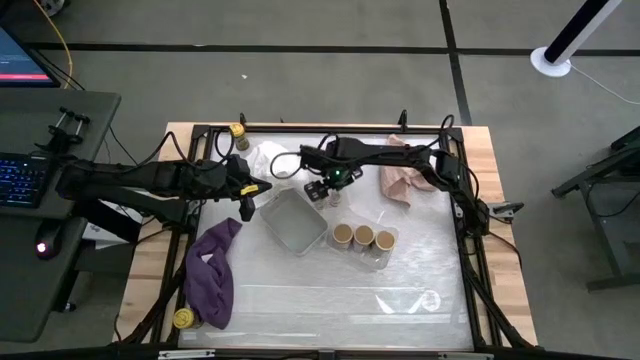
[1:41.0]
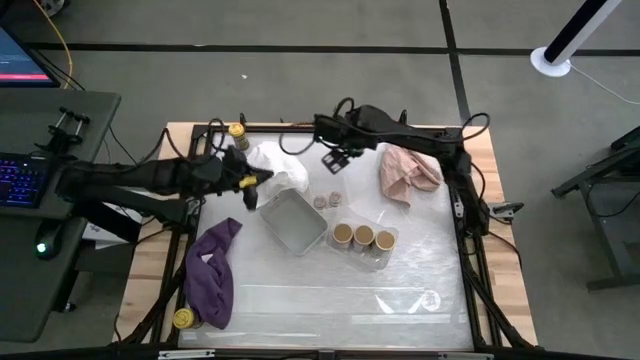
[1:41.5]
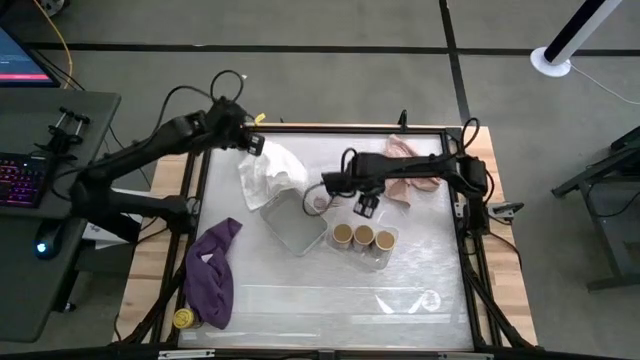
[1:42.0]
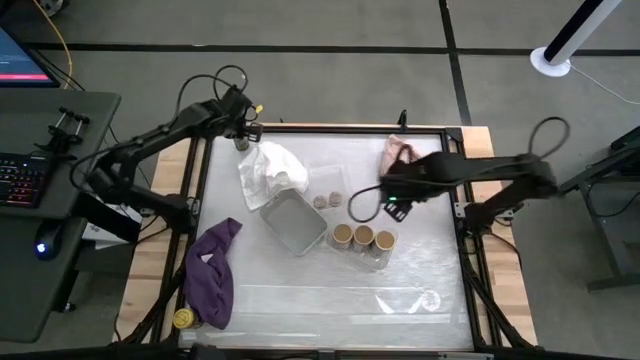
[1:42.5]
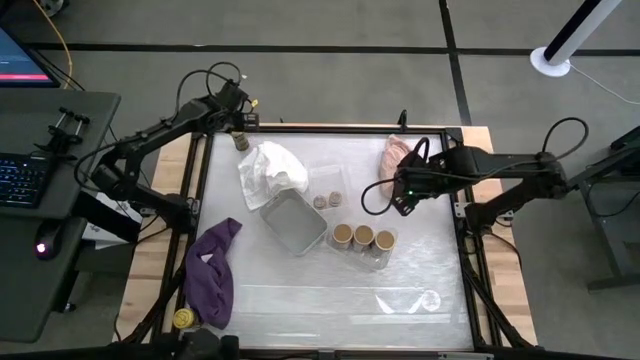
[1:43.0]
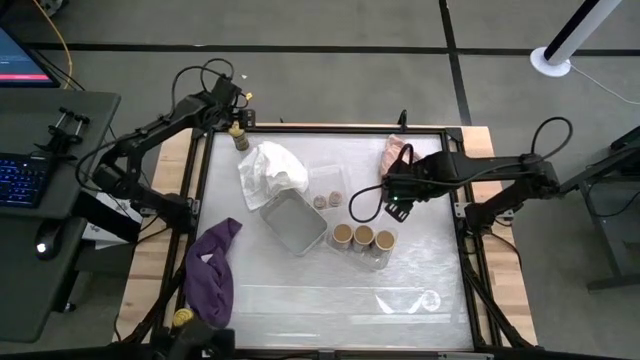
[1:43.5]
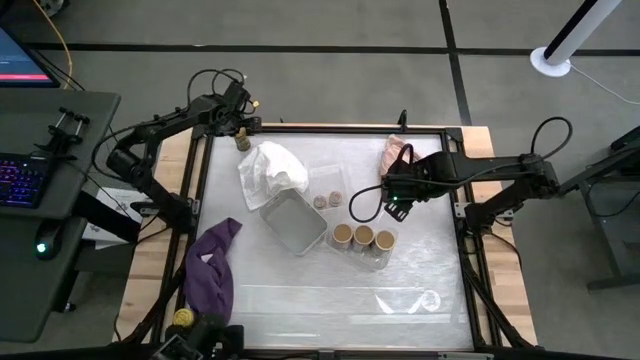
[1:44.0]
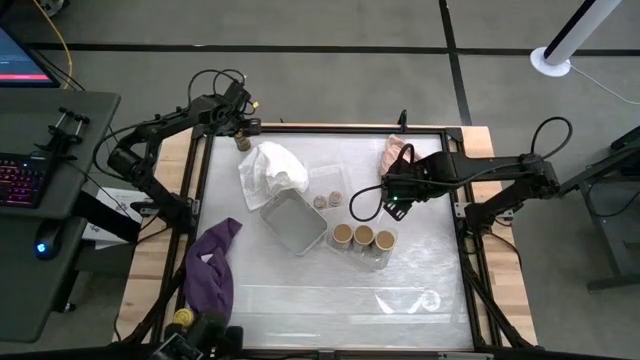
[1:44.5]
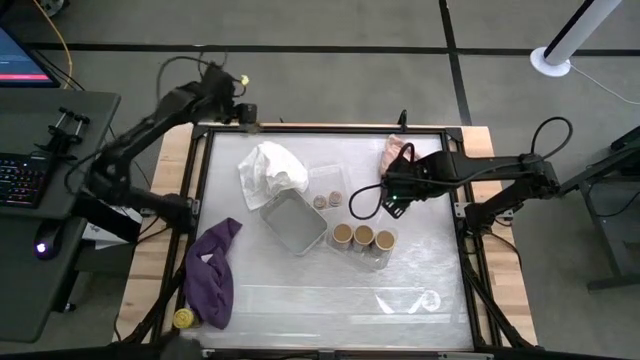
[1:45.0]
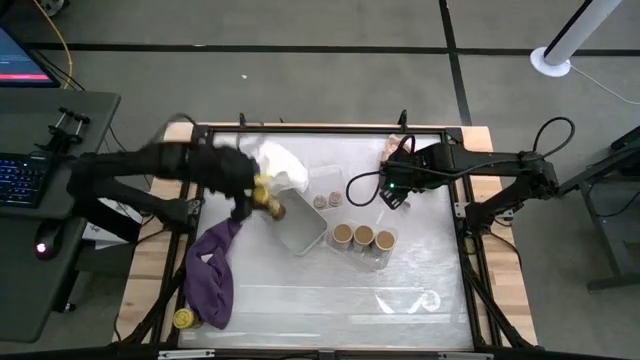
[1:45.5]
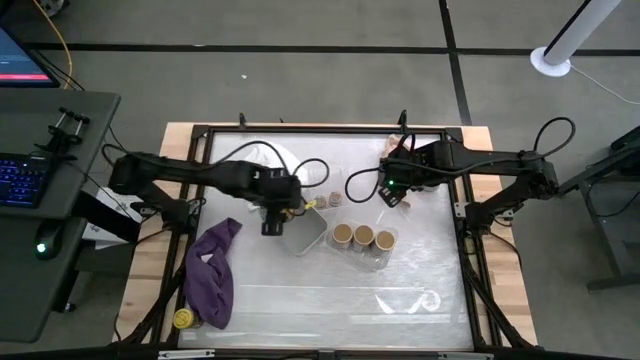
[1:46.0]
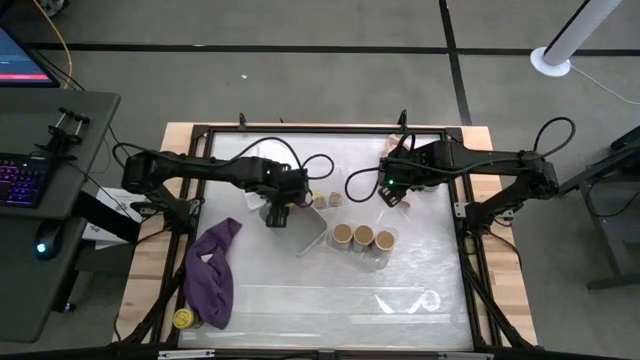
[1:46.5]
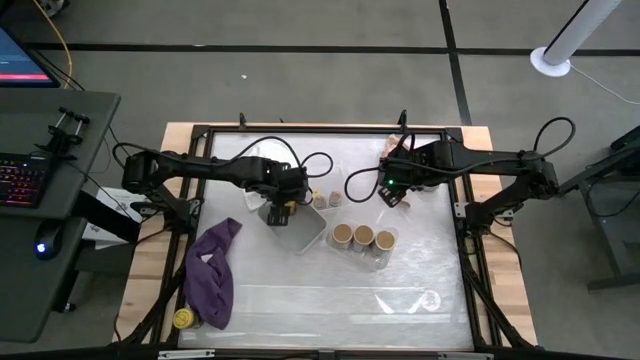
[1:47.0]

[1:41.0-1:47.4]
Task: Sort spices by type
Put the top yellow seasoning bottle into the gray bin

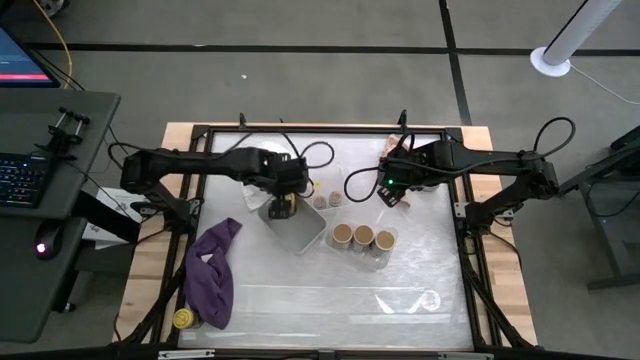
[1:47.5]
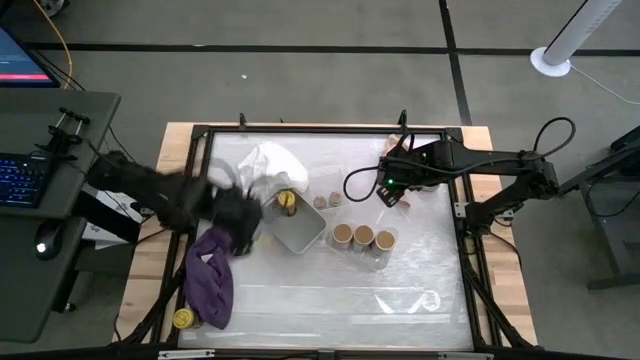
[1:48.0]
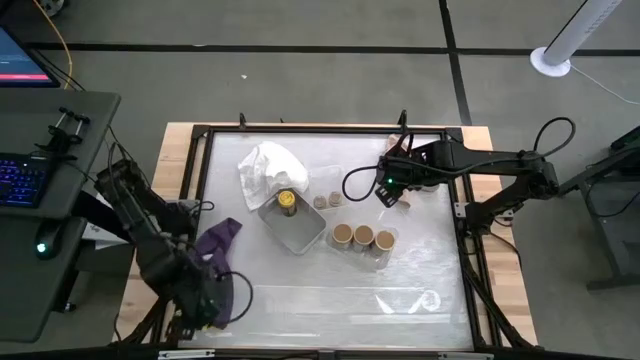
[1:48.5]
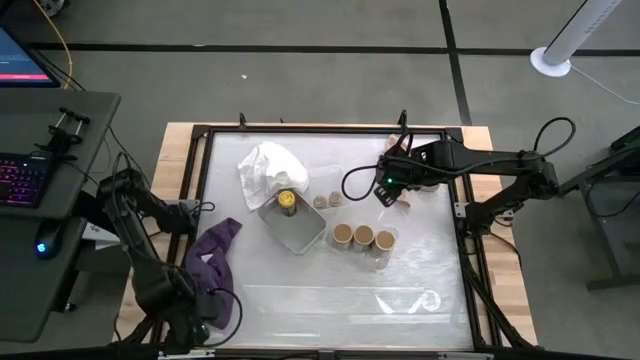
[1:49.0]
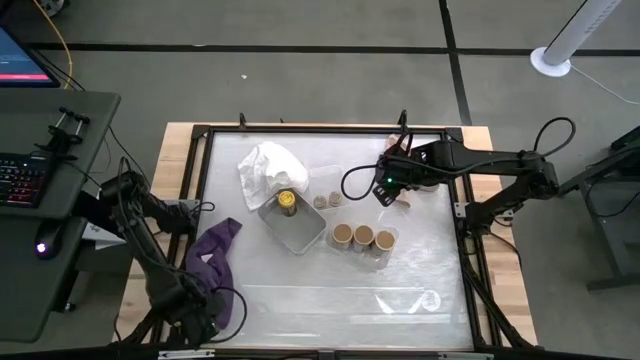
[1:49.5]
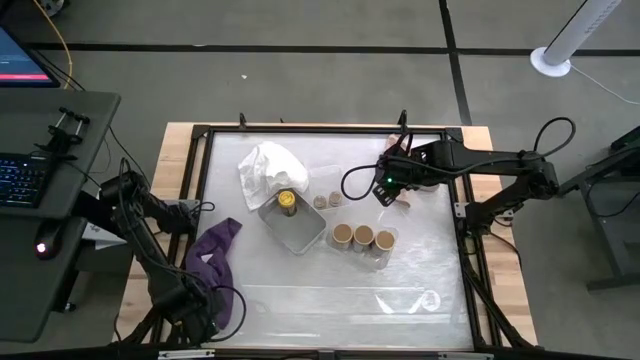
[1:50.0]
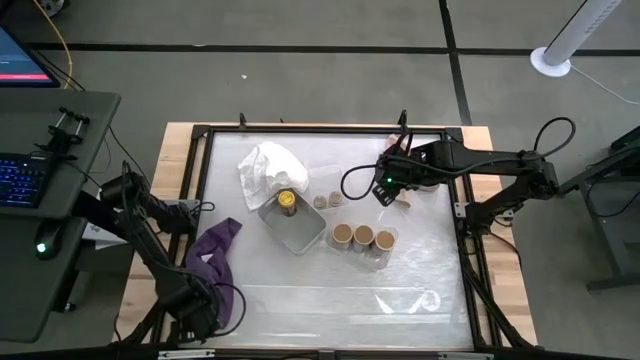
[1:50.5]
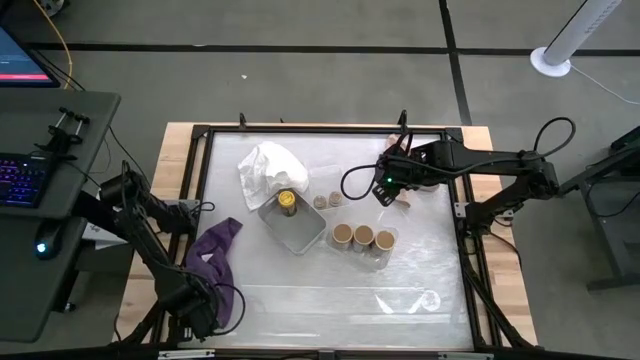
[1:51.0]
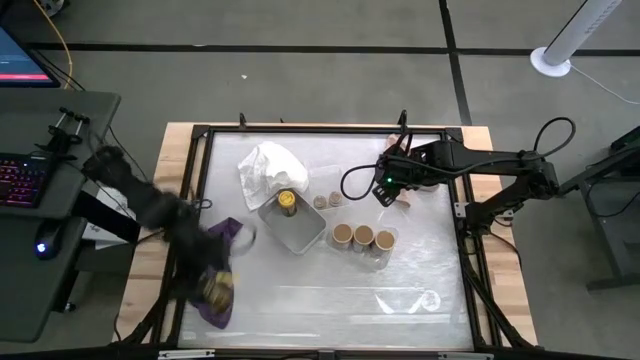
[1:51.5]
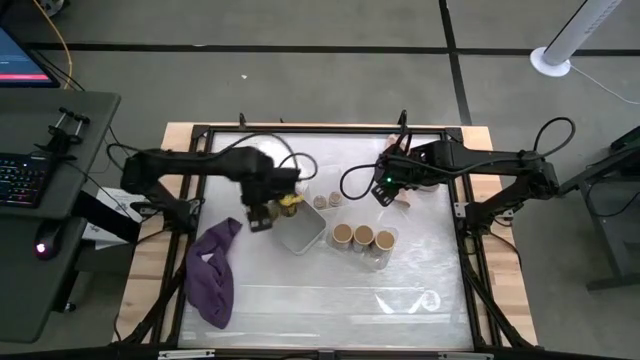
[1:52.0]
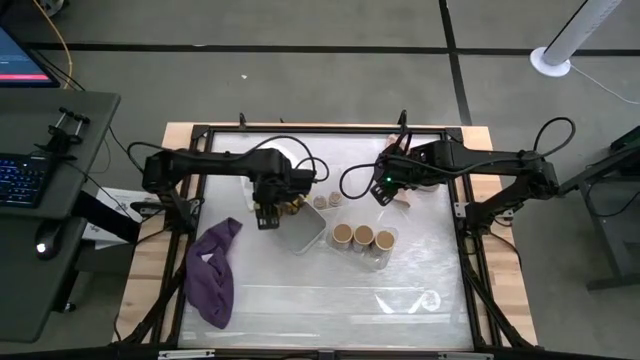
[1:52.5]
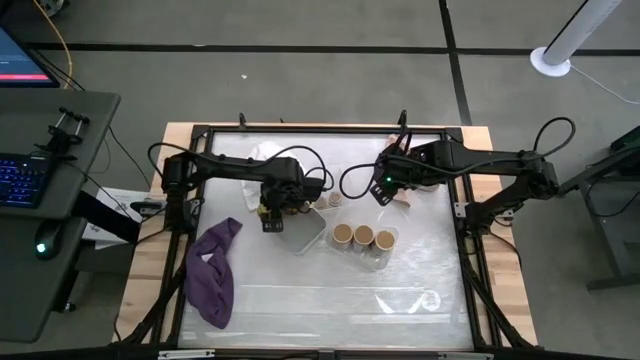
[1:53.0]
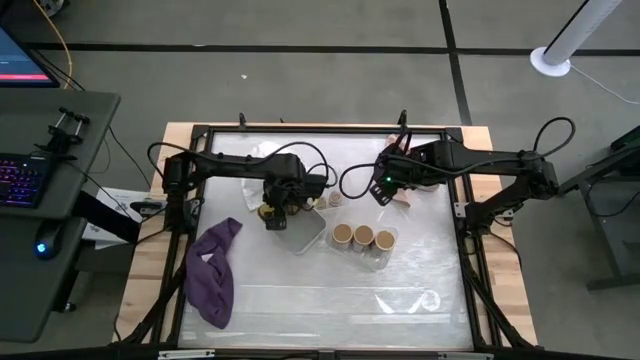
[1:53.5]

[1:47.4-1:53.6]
Put the yellow seasoning bottle into the gray bin

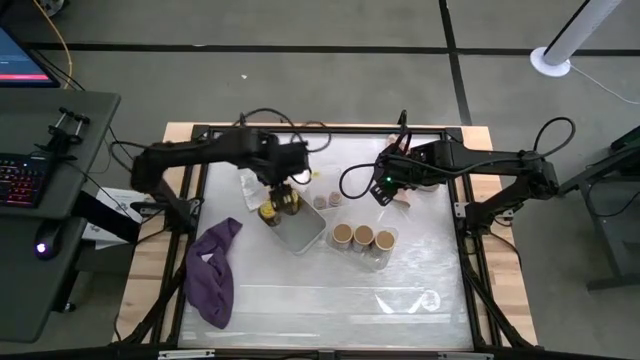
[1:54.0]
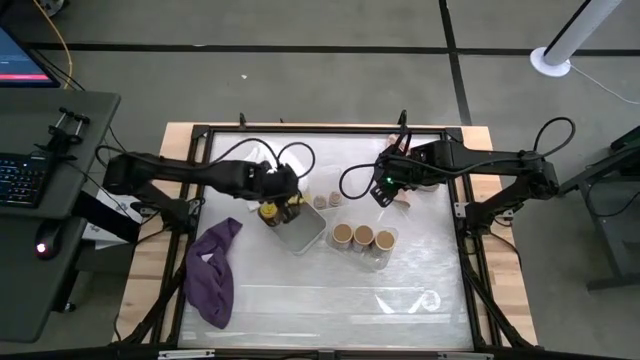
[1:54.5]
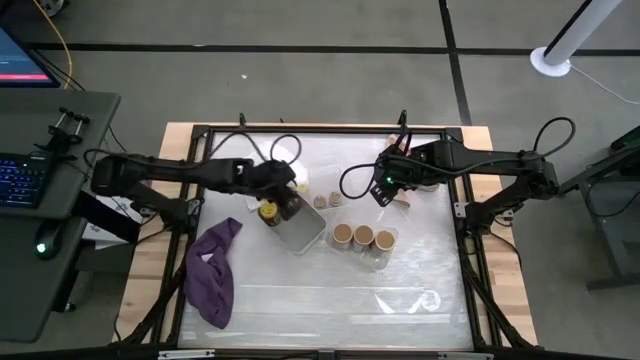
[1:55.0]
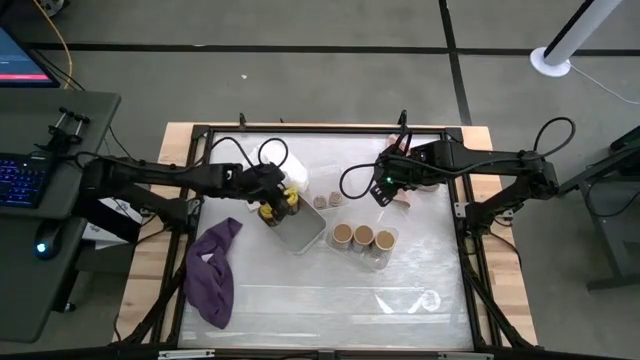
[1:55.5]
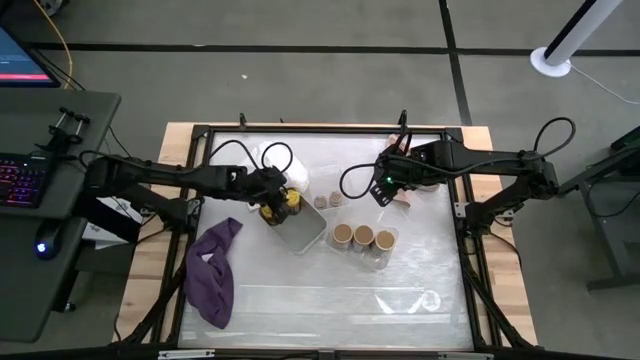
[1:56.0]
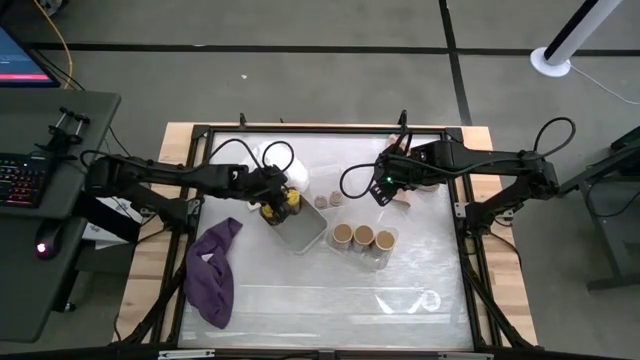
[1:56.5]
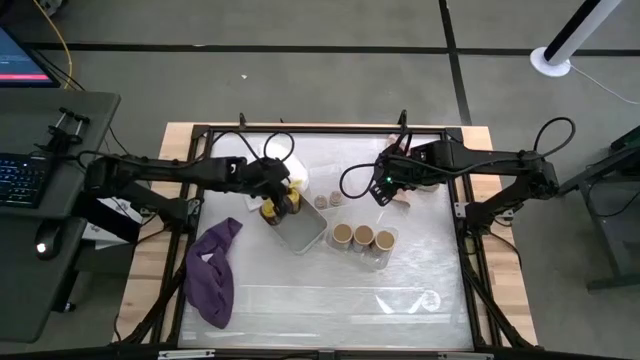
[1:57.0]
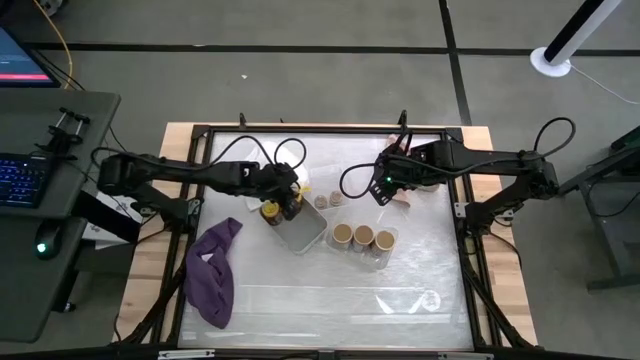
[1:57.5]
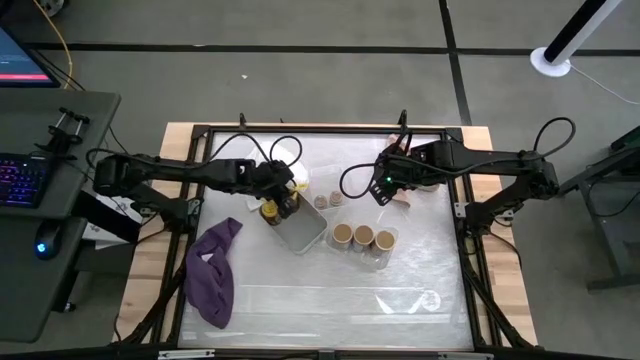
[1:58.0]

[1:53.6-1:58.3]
Adjust the right yellow seasoning bottle in the gray bin

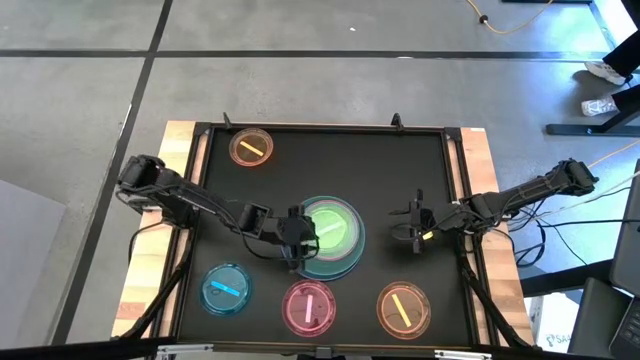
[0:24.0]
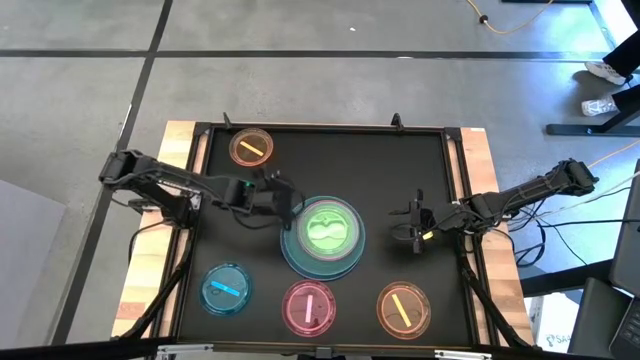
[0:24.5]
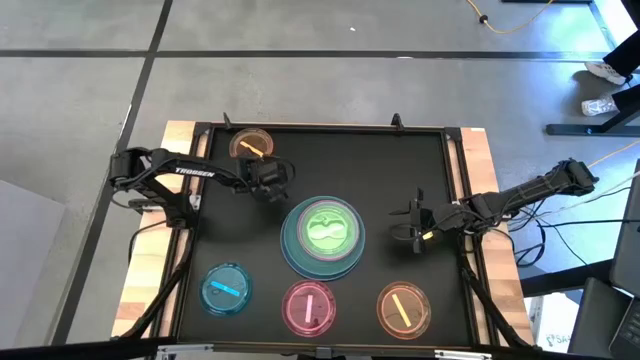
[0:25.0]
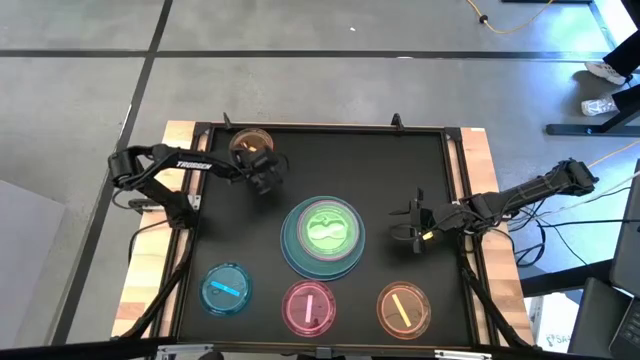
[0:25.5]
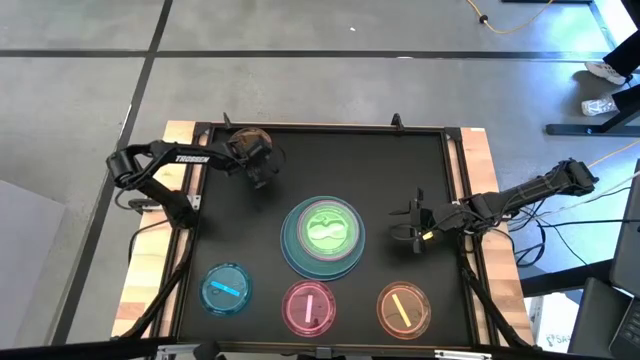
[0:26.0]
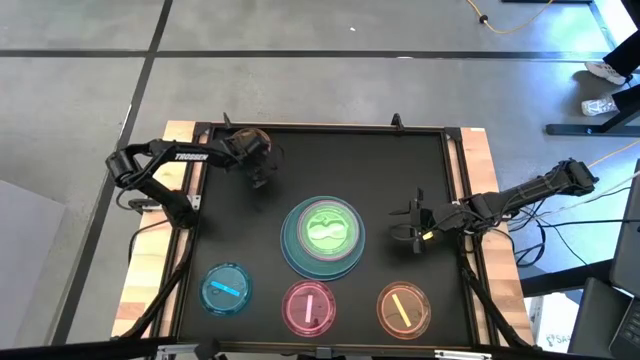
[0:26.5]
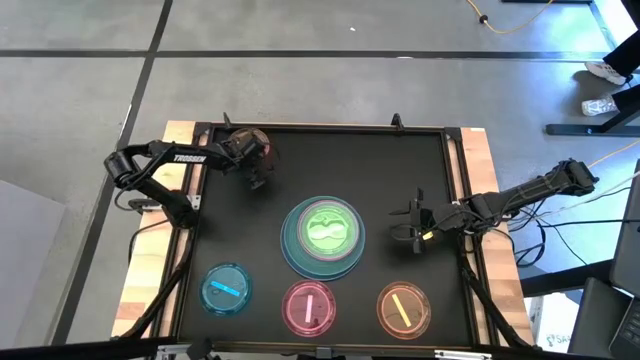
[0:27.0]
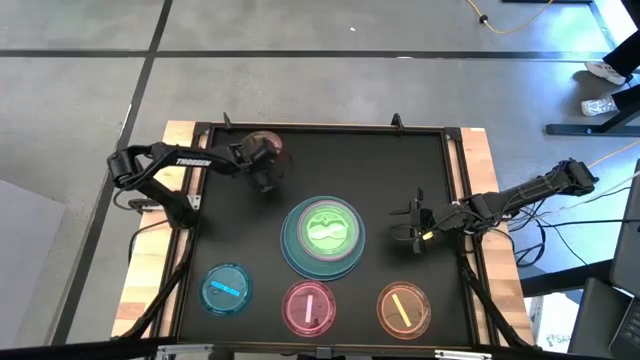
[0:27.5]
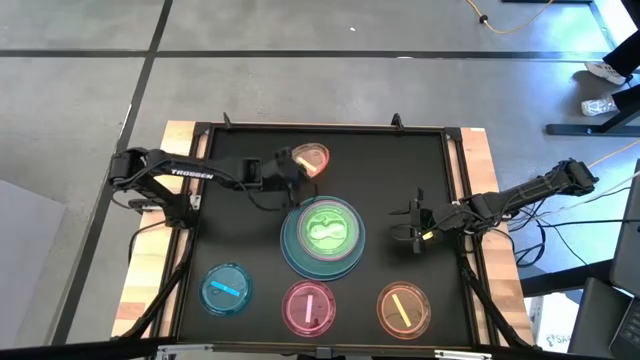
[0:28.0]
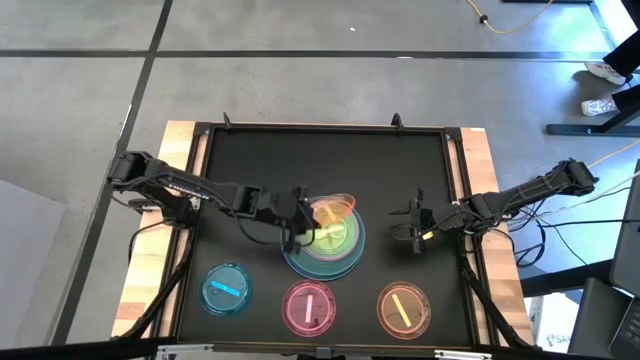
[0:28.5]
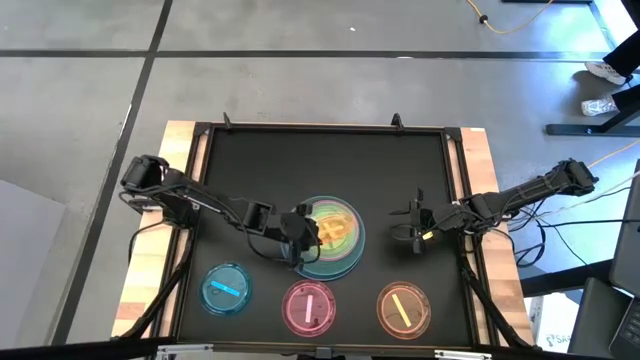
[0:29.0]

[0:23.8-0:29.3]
Task: Stack plastic plates
Stack the small orange plate on the small light green plate
